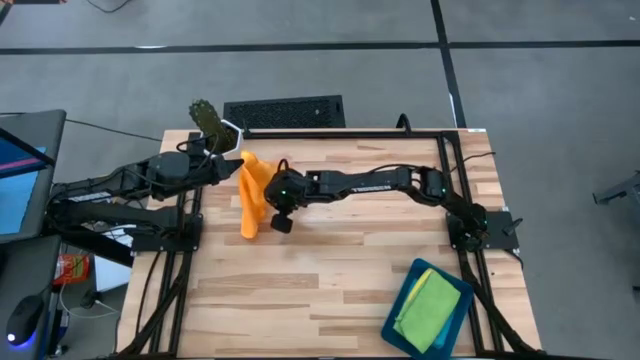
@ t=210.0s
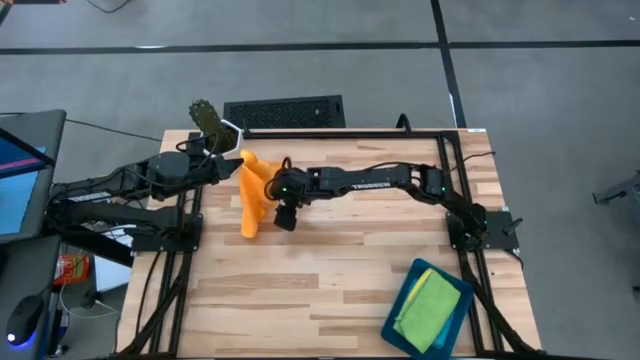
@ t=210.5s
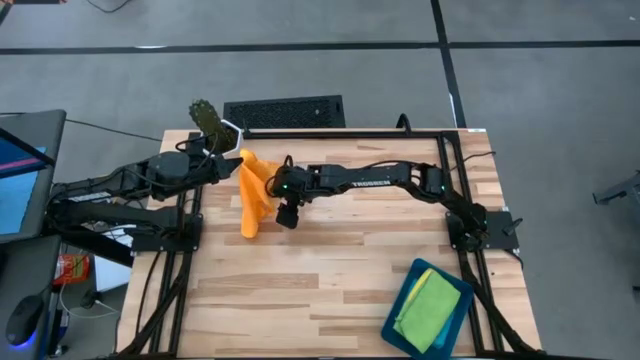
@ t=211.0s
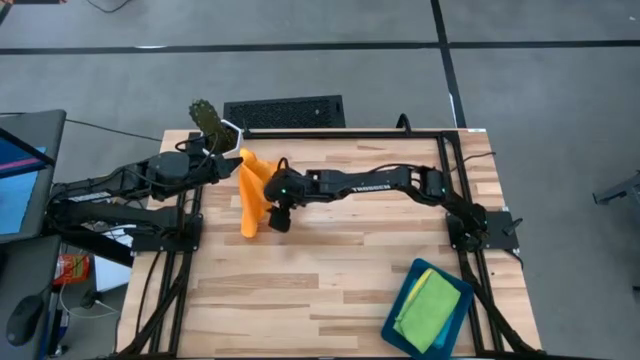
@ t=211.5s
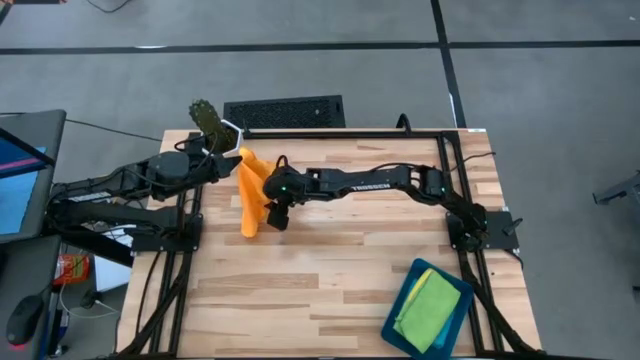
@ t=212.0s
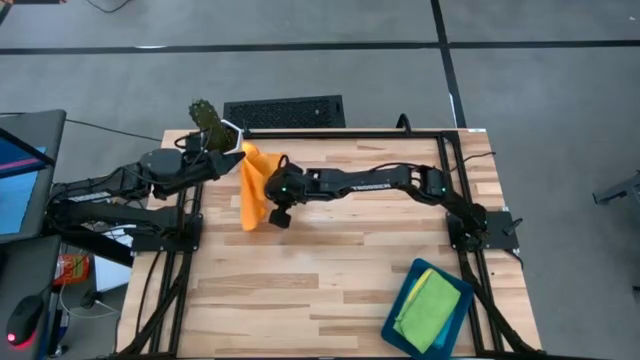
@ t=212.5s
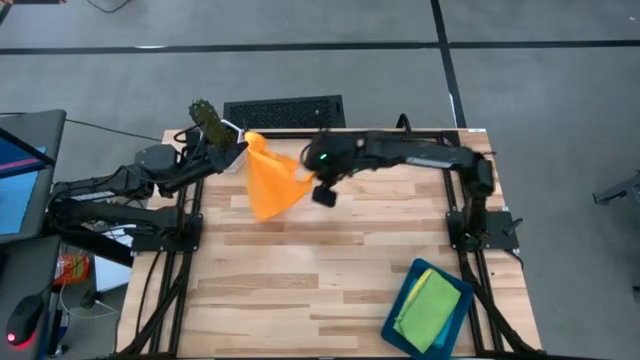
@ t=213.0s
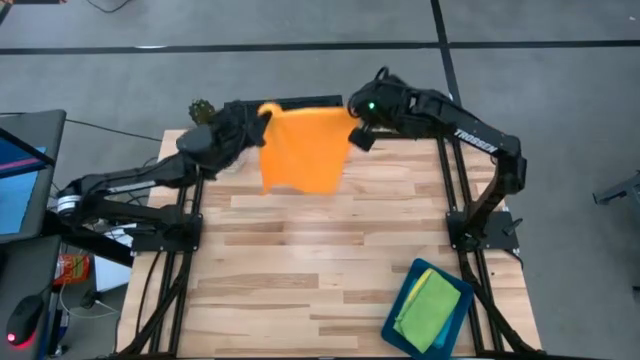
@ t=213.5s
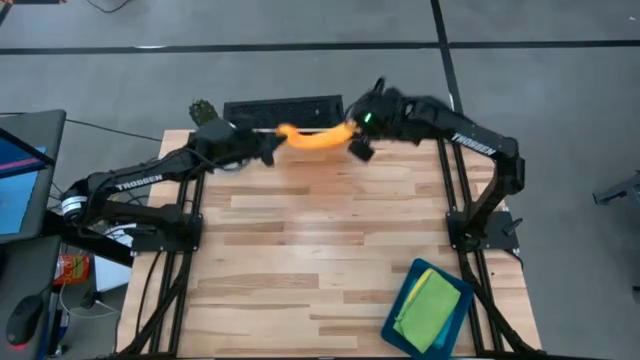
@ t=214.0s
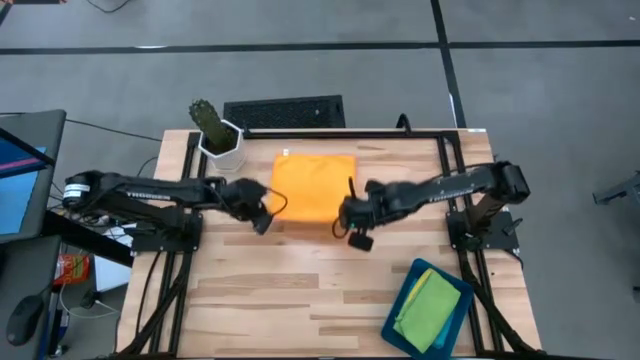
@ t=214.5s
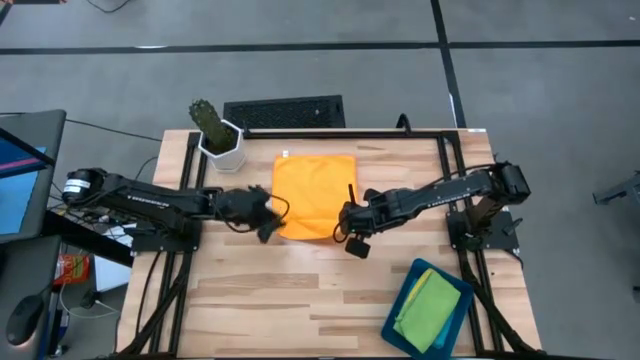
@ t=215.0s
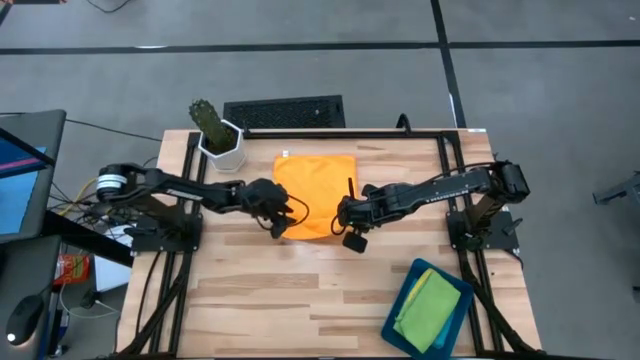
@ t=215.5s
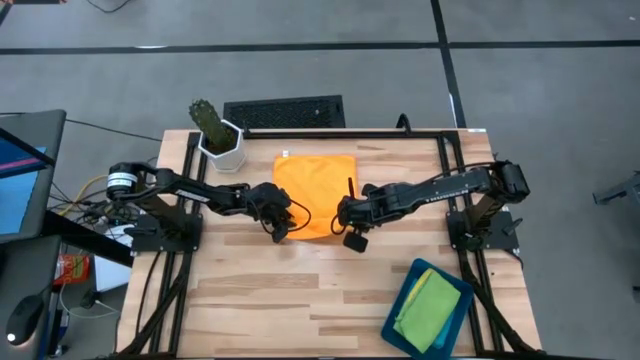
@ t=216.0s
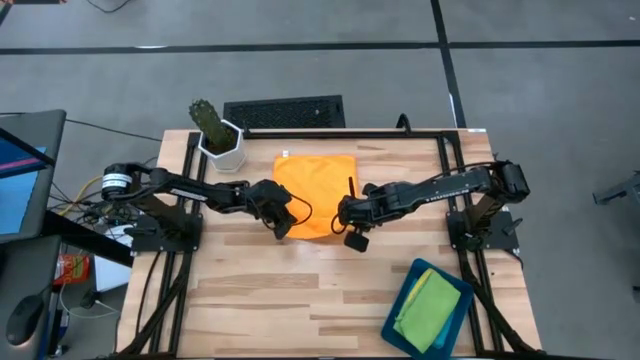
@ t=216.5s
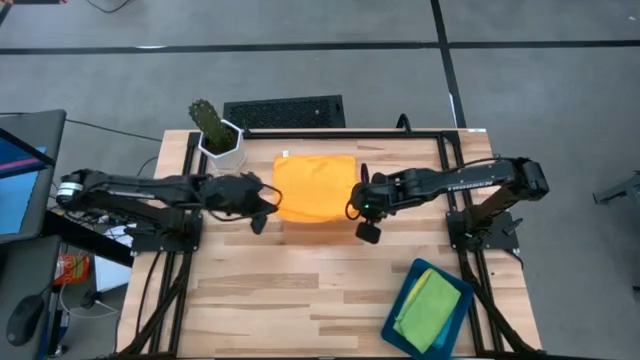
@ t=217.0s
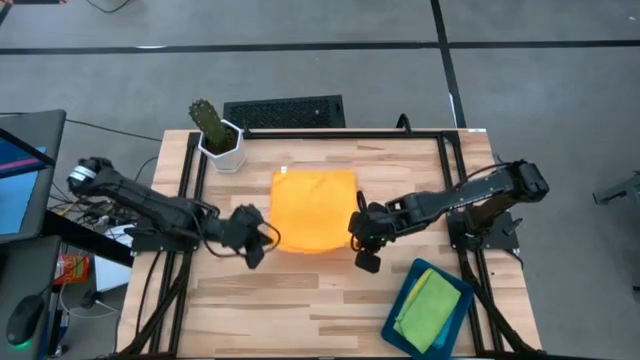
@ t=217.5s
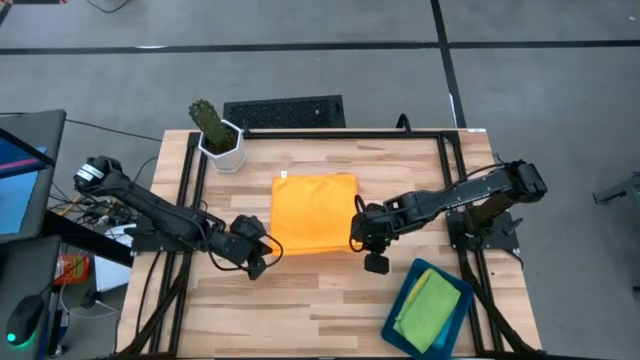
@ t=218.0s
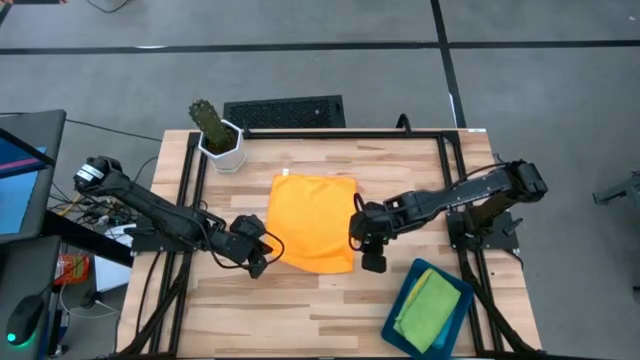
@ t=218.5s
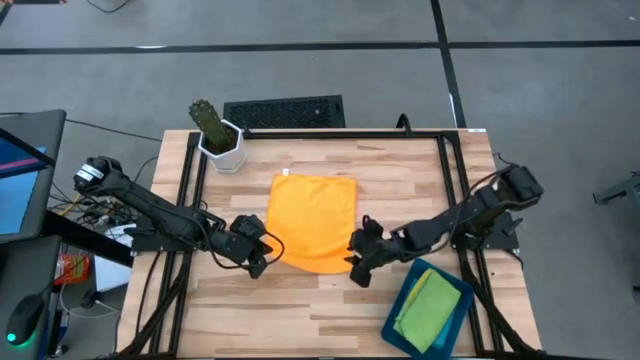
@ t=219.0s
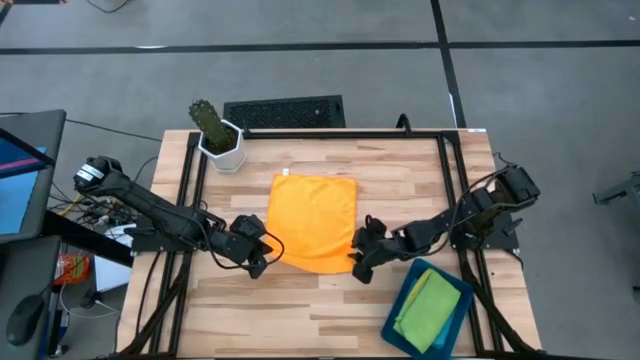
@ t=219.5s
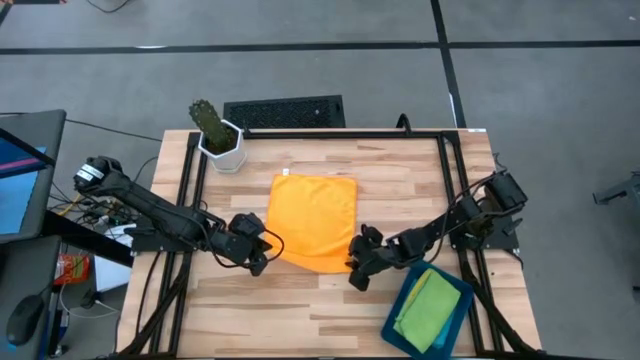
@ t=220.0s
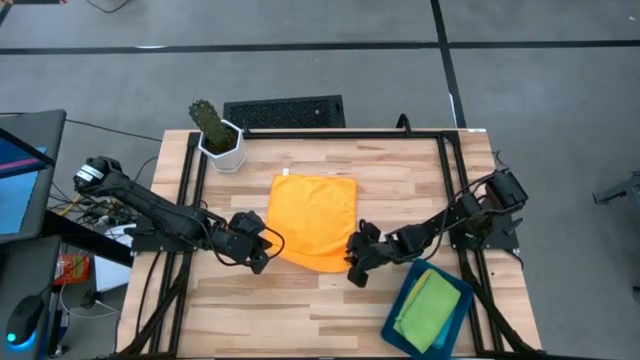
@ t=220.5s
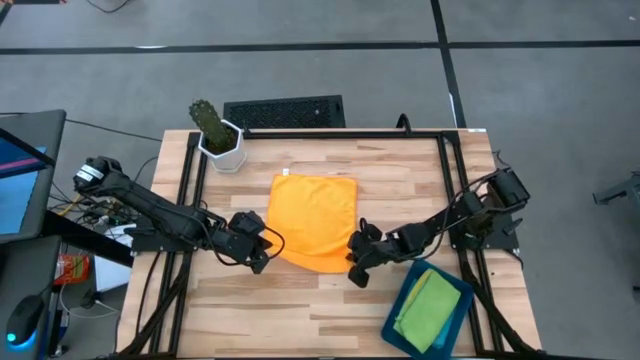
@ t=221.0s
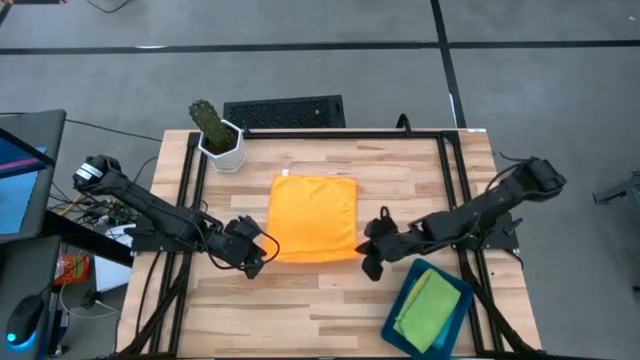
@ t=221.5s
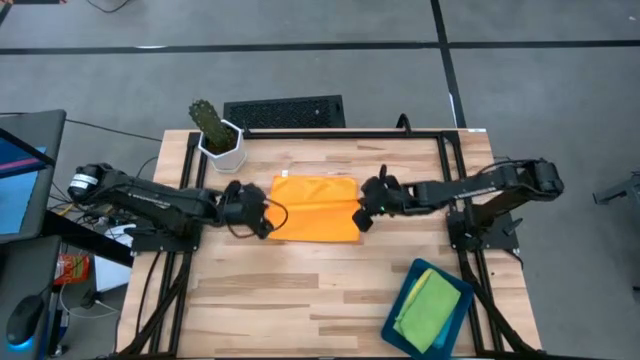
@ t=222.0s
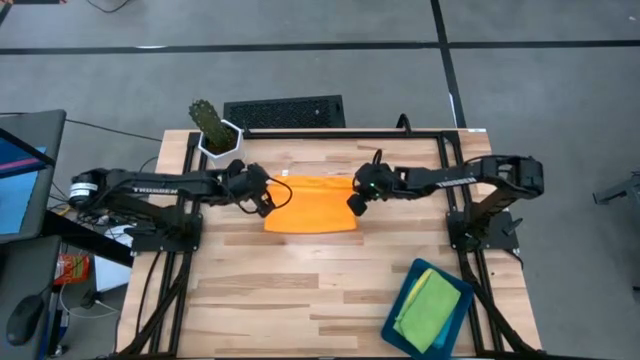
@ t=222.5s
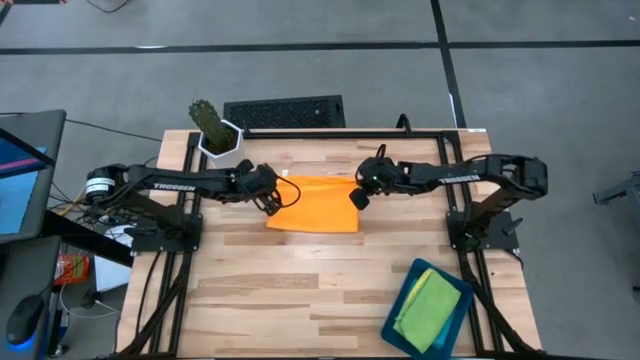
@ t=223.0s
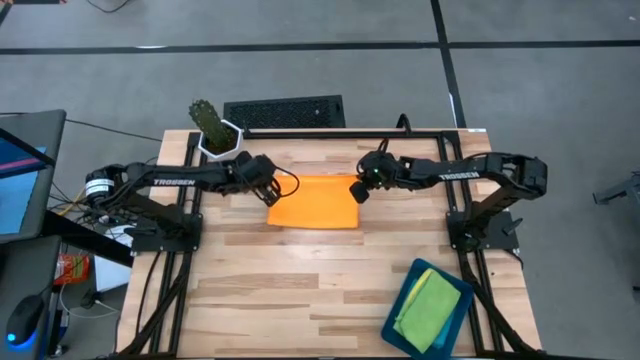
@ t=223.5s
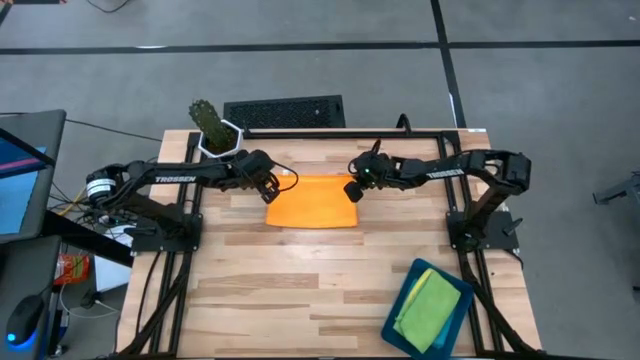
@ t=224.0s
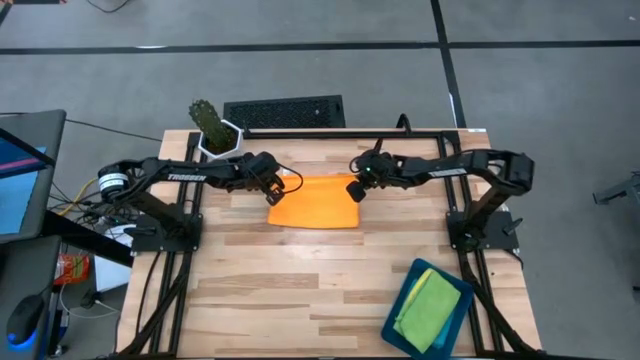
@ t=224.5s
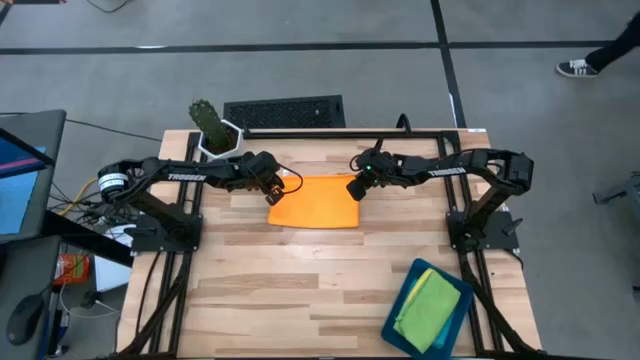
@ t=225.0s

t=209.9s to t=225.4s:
Task: Fold microfiber towels
Fold the orange microfiber towel

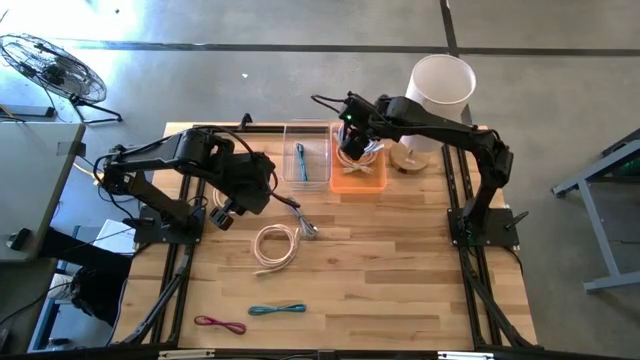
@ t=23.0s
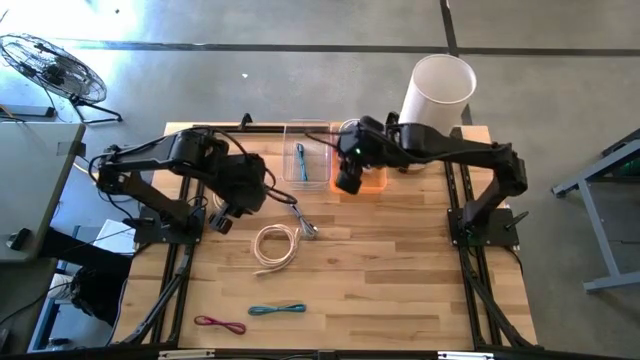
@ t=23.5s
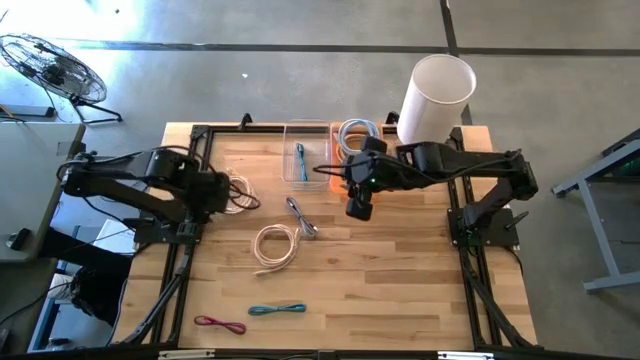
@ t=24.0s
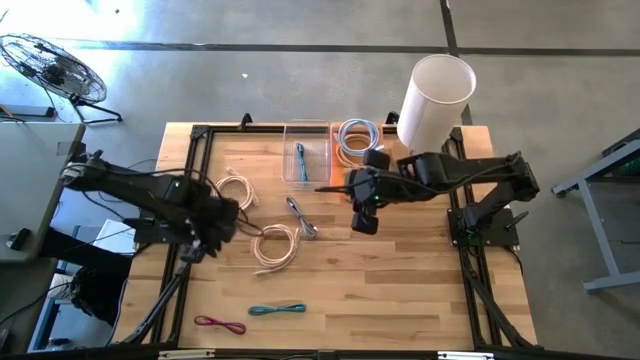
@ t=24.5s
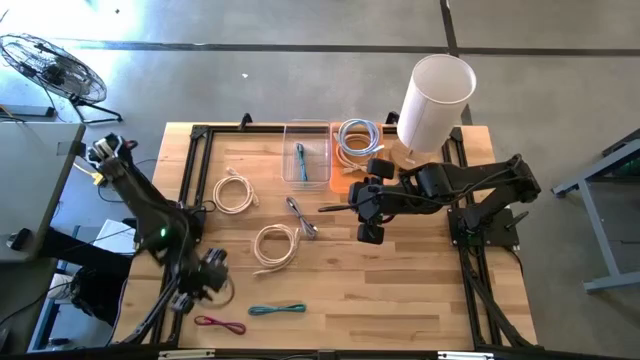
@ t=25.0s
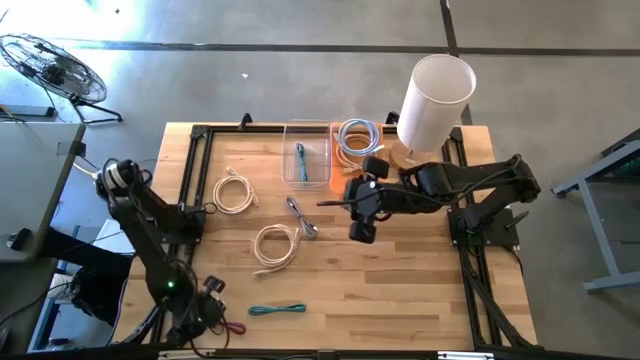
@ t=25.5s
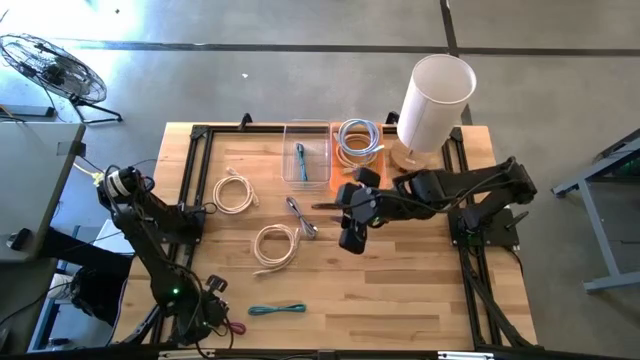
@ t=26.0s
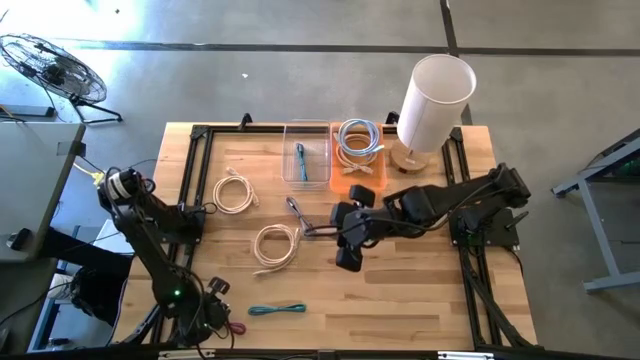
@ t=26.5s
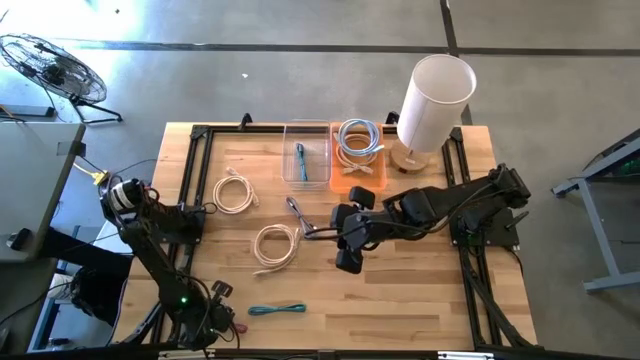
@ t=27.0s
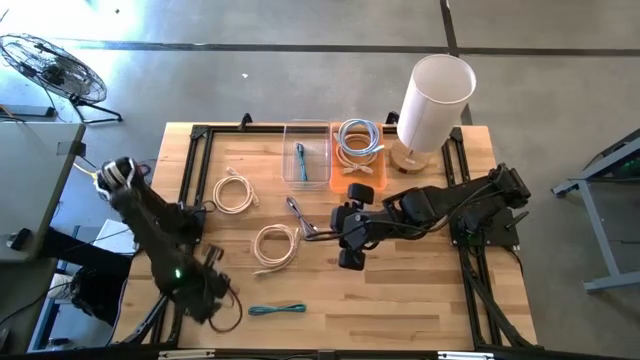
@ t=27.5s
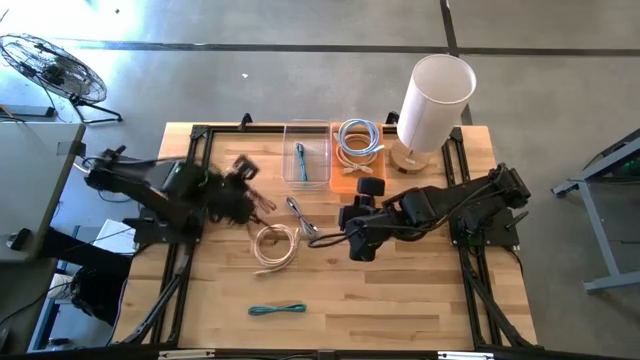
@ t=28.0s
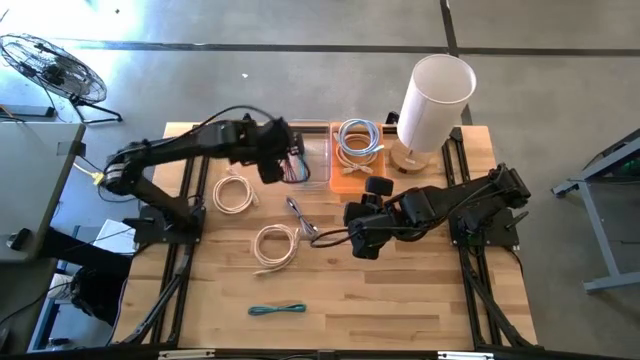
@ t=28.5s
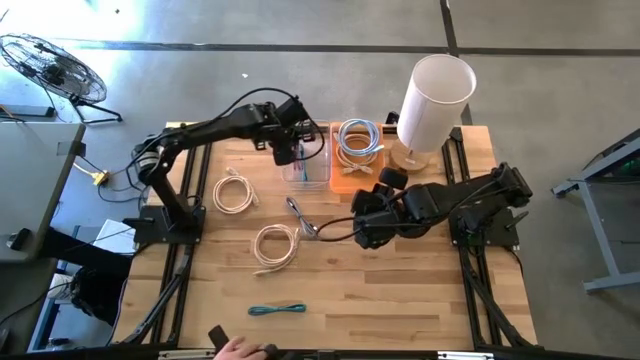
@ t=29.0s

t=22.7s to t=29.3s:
Task: Pick & Place USB Port
Put the violet charger cable into the transparent bin
